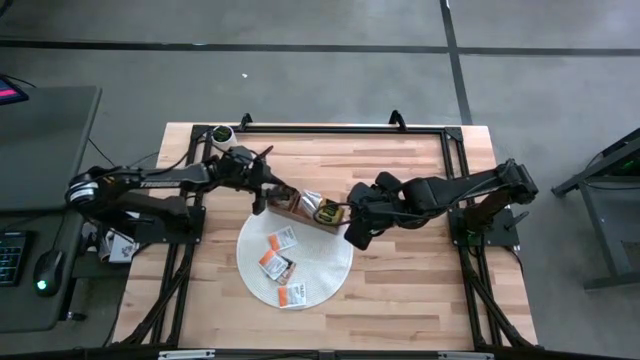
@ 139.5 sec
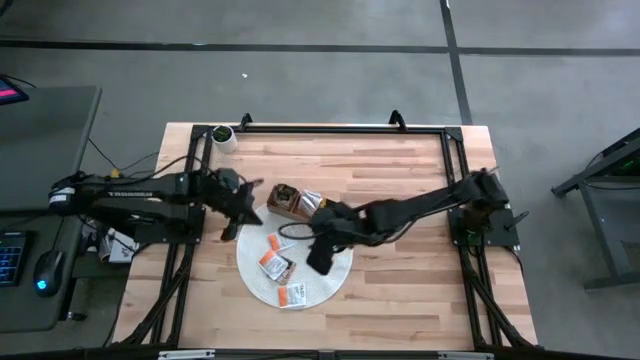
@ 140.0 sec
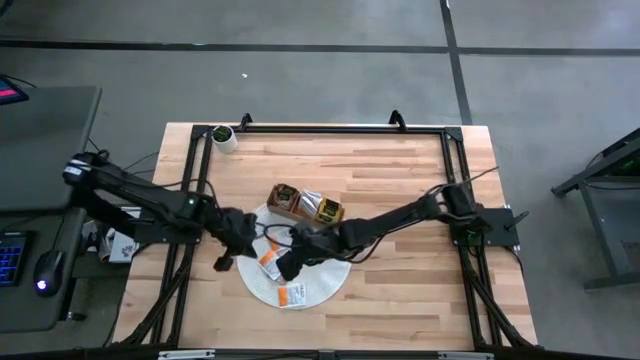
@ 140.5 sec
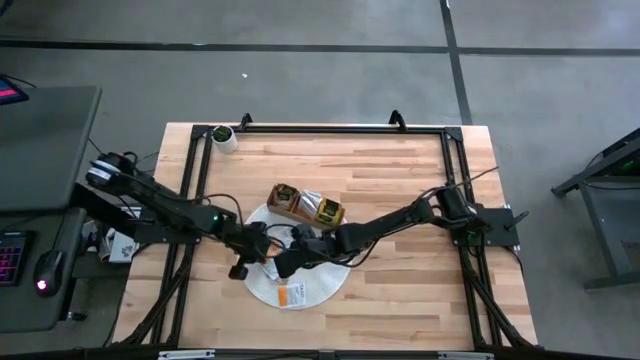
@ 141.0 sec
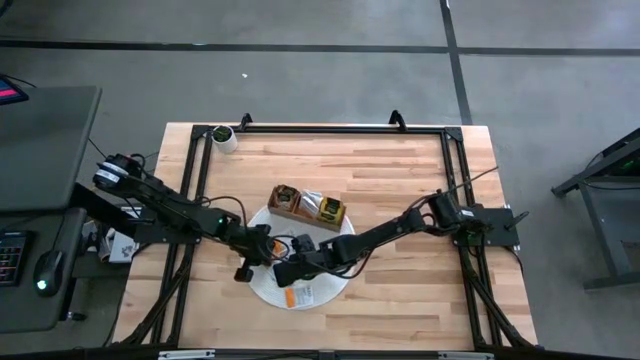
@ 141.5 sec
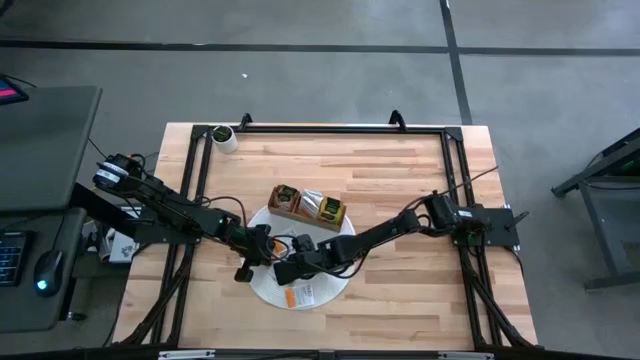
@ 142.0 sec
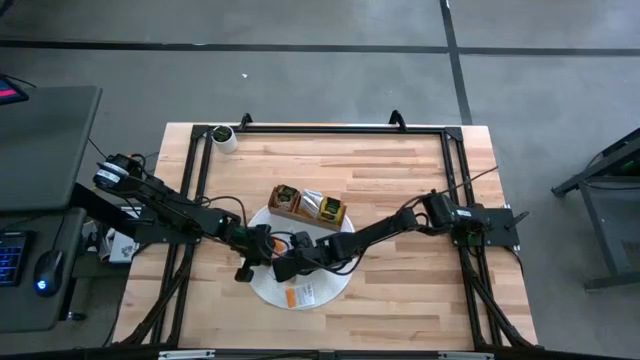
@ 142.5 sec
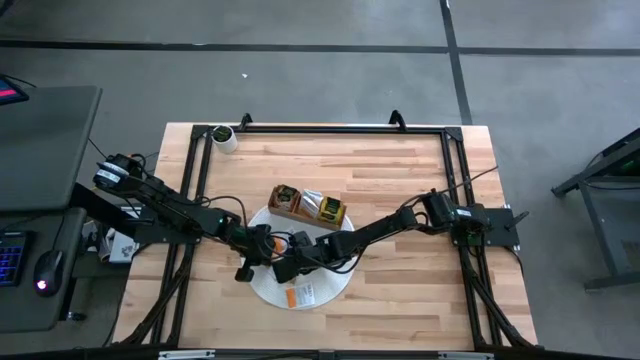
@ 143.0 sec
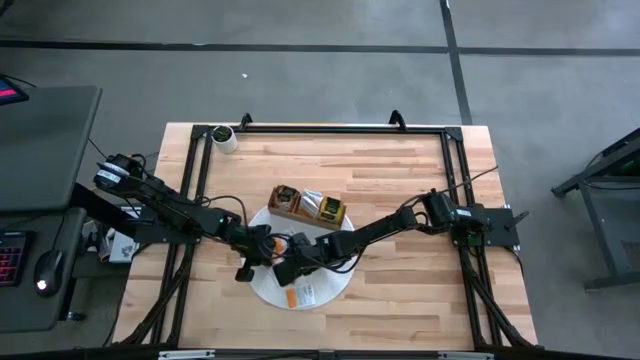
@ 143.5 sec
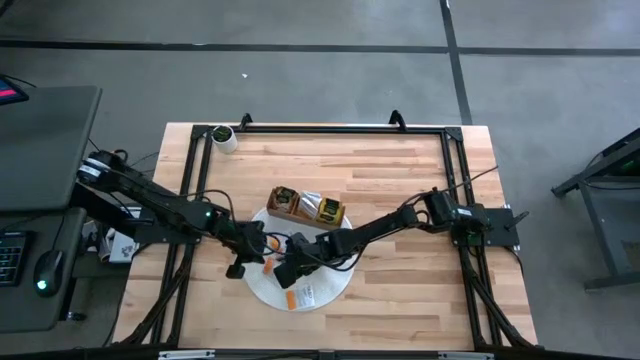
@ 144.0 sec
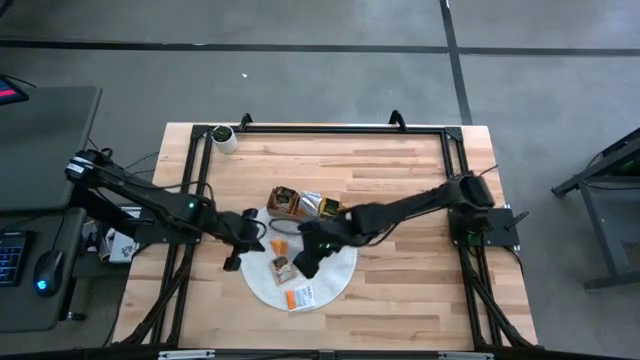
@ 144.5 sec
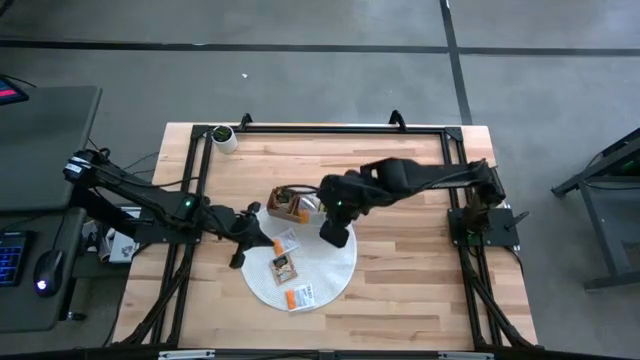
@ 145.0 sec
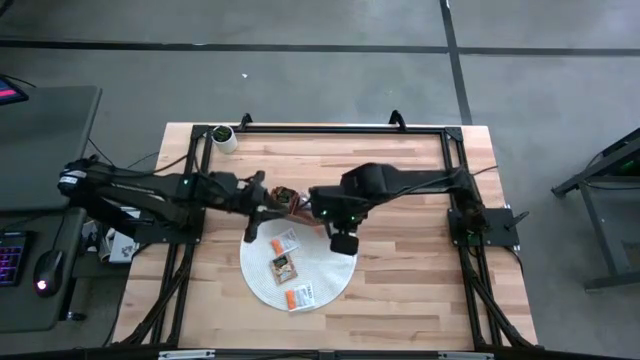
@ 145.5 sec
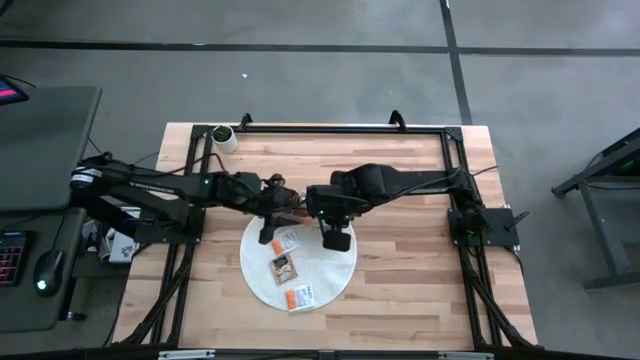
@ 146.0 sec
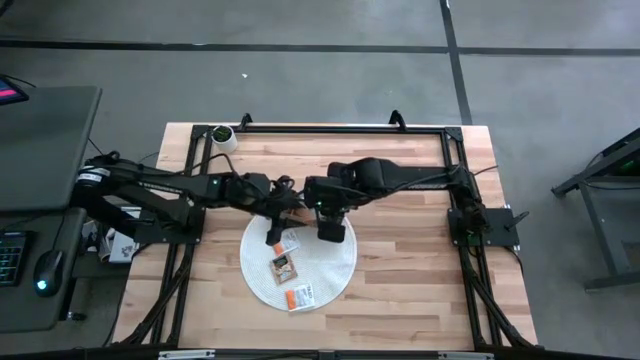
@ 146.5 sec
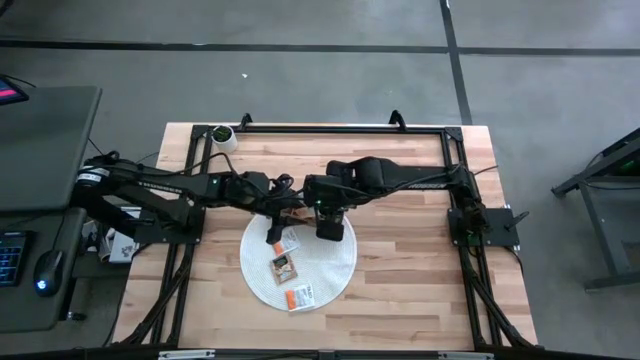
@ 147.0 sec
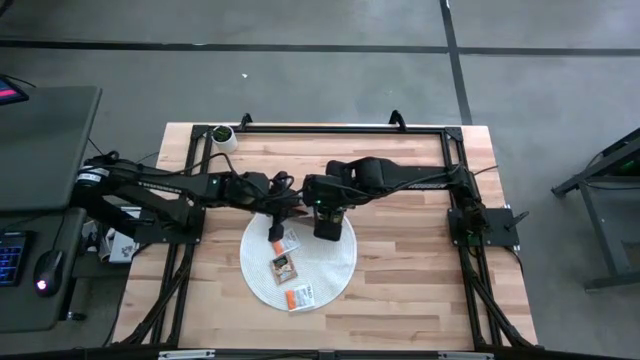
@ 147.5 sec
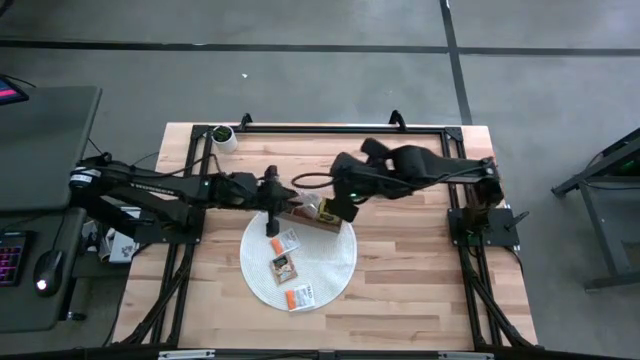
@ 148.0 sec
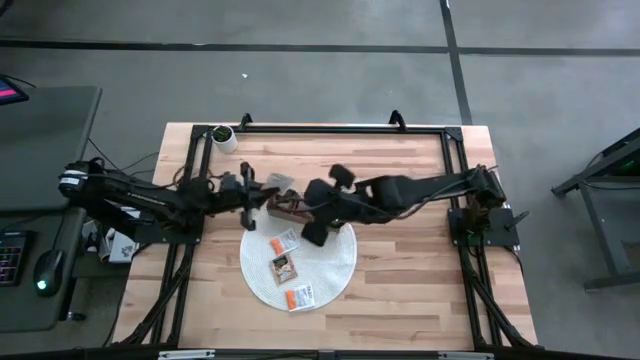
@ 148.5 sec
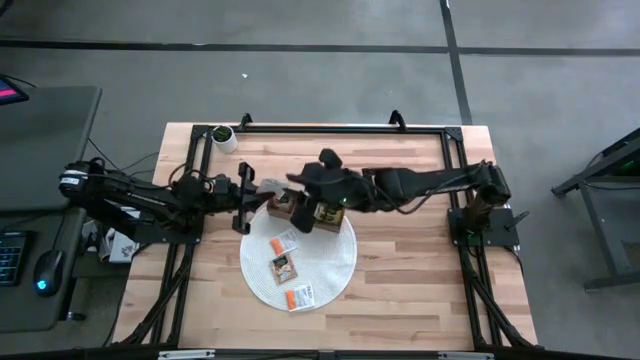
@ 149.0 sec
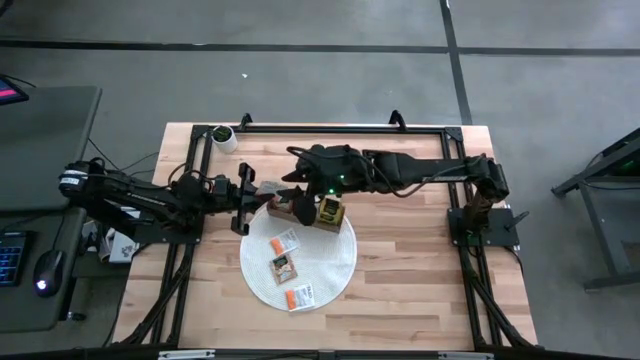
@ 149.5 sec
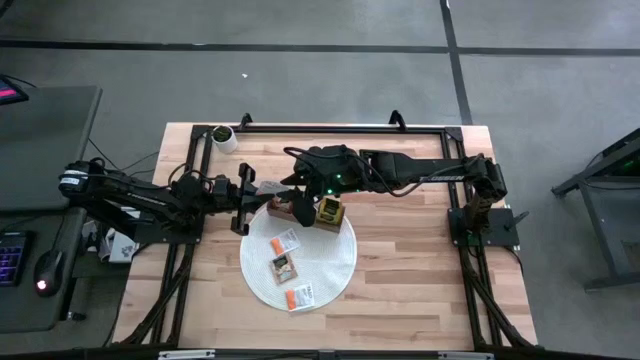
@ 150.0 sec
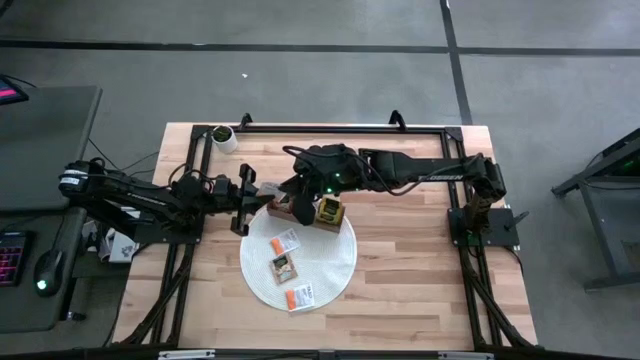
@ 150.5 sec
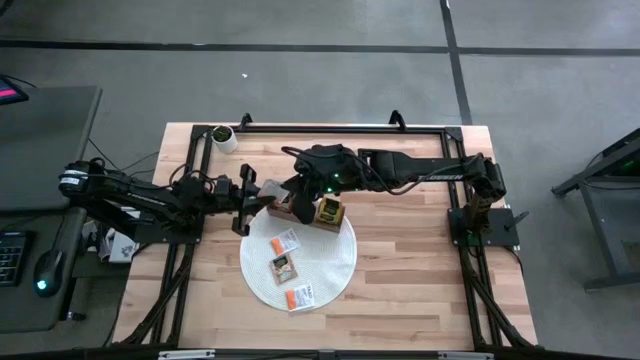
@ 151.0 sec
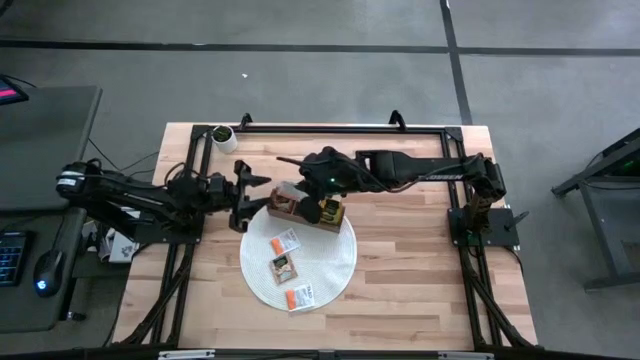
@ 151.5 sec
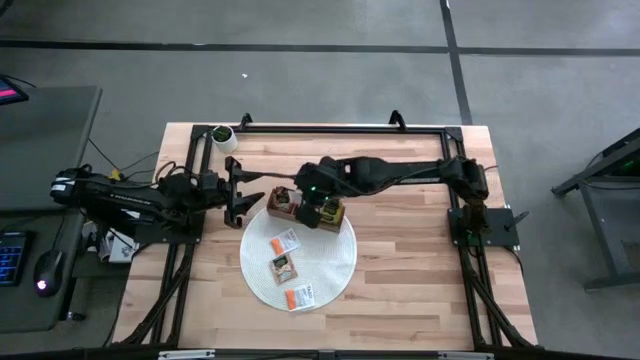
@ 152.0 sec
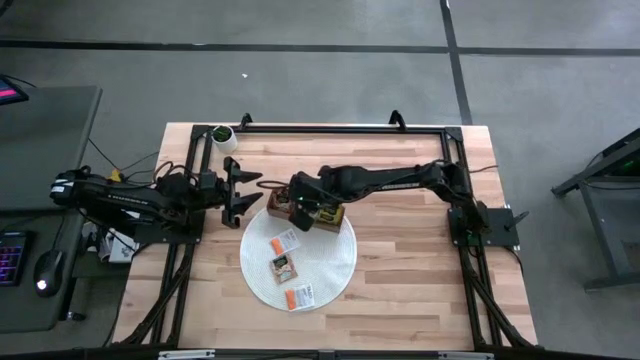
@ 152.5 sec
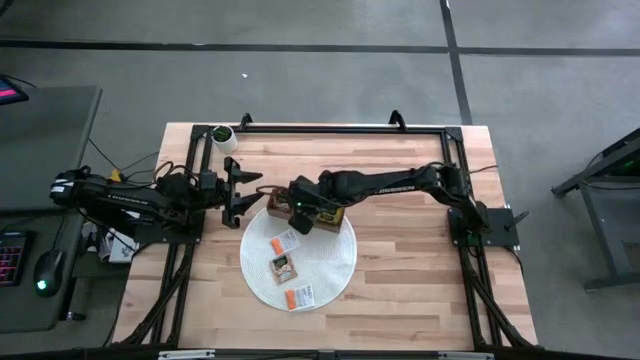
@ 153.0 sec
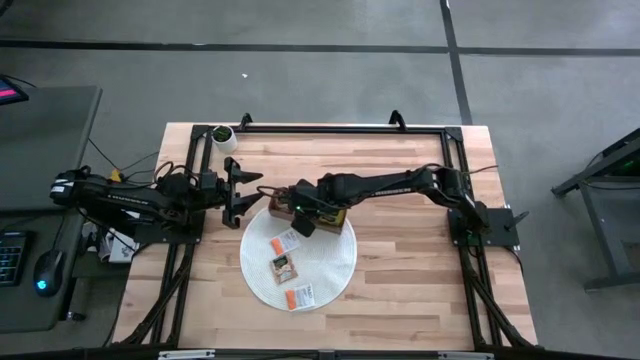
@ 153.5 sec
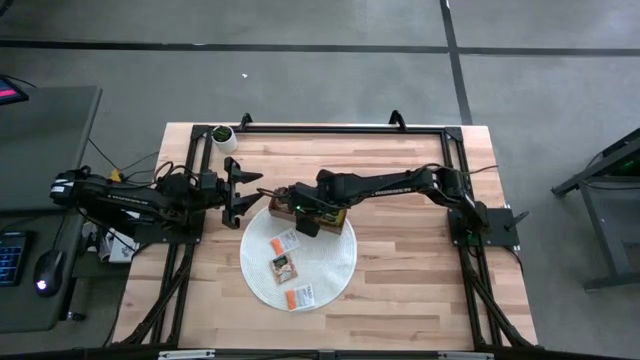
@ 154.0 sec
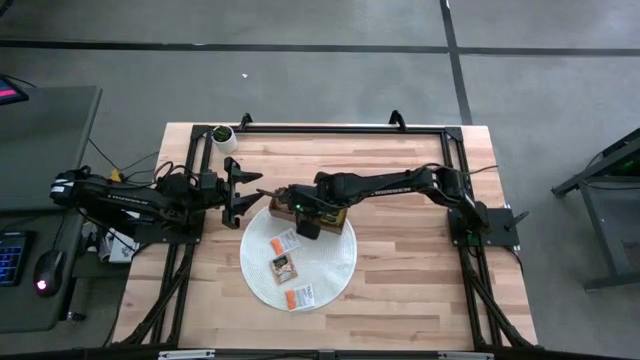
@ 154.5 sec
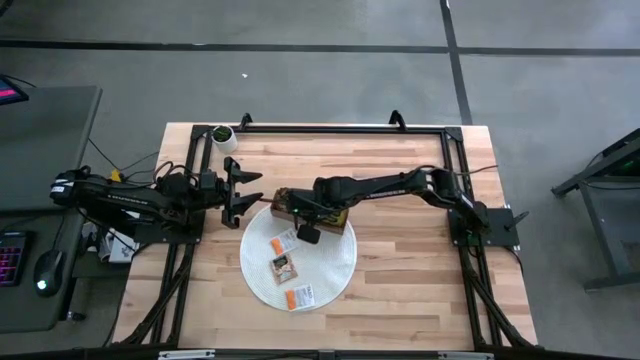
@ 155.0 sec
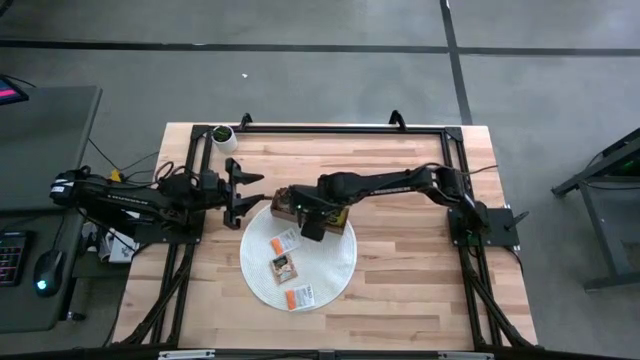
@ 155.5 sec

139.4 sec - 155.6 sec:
Task: Pick & Place Tea
Put the orange tea bag into the middle section of the wooden organizer
